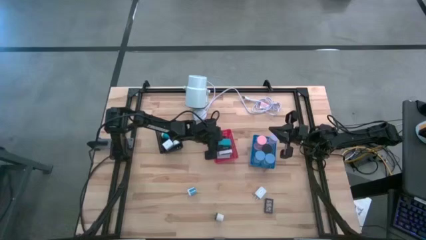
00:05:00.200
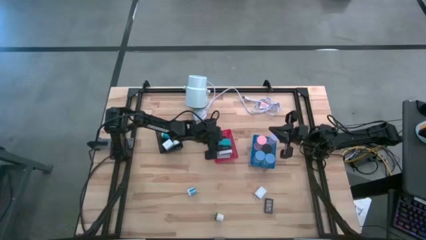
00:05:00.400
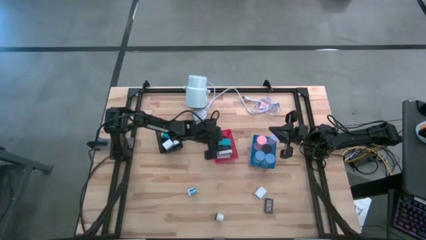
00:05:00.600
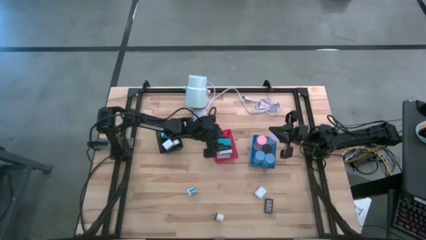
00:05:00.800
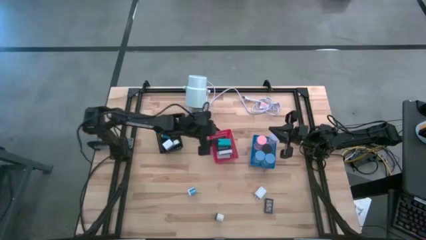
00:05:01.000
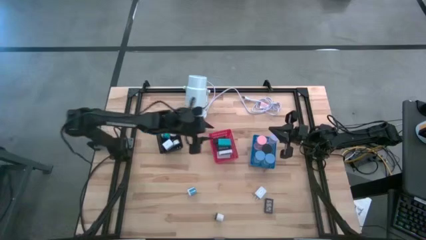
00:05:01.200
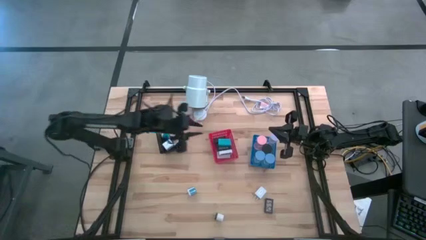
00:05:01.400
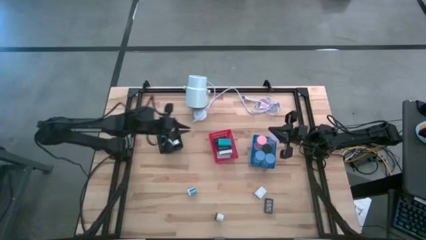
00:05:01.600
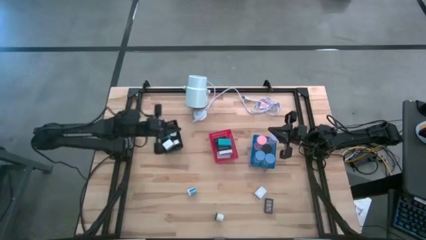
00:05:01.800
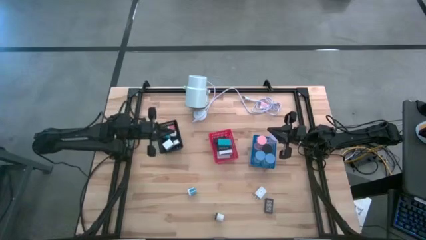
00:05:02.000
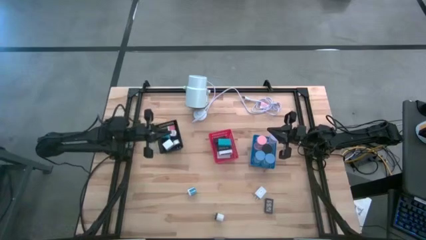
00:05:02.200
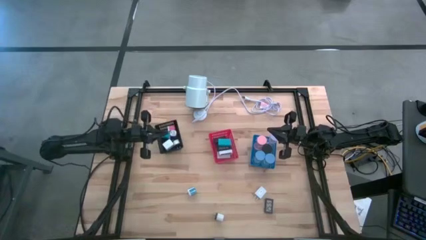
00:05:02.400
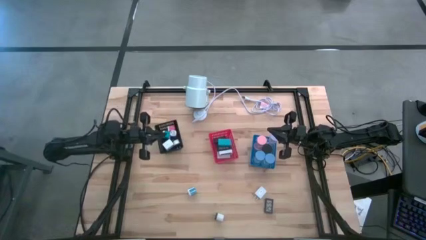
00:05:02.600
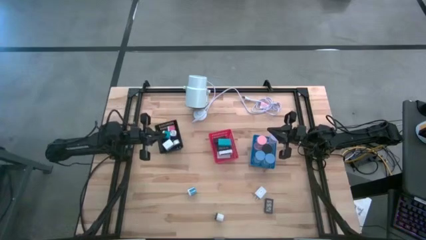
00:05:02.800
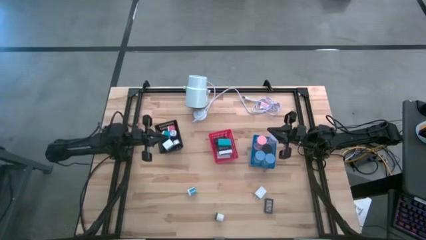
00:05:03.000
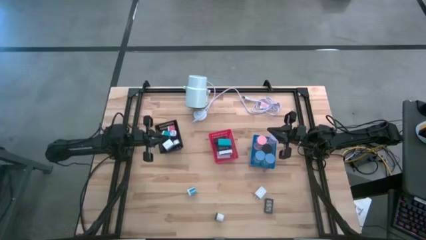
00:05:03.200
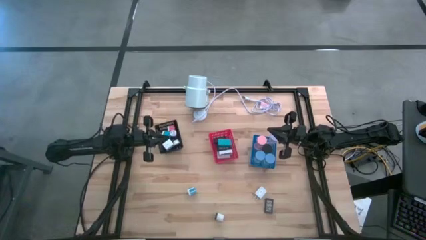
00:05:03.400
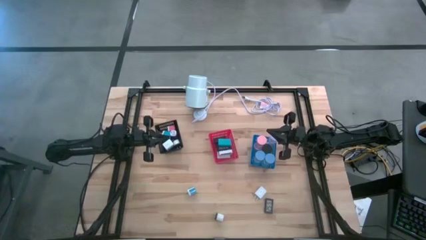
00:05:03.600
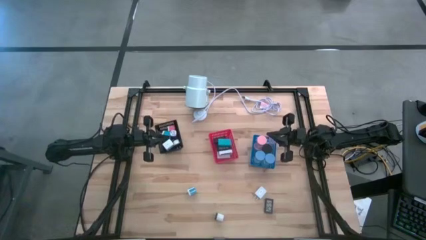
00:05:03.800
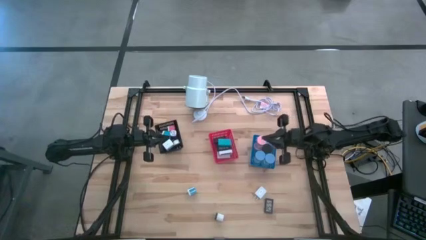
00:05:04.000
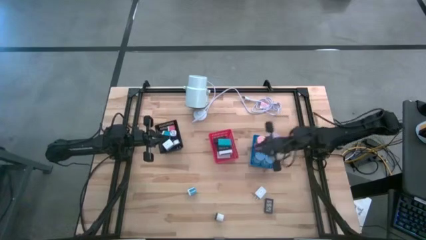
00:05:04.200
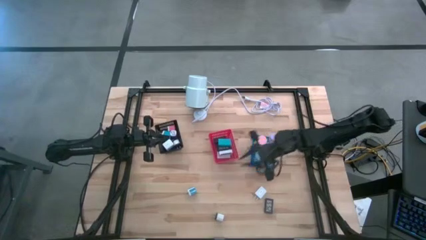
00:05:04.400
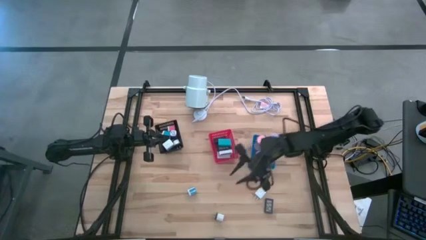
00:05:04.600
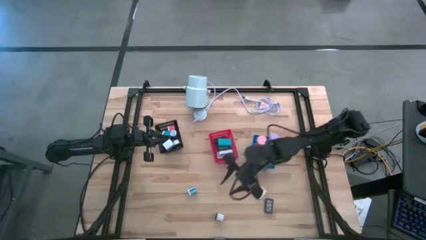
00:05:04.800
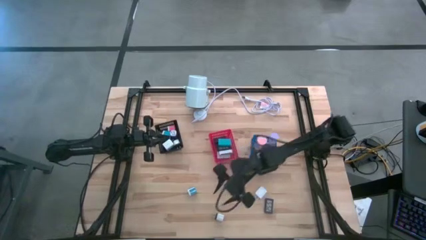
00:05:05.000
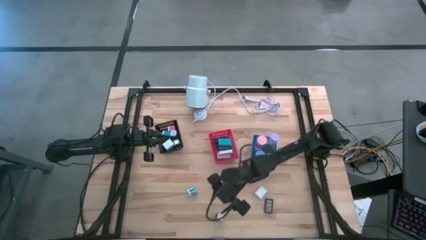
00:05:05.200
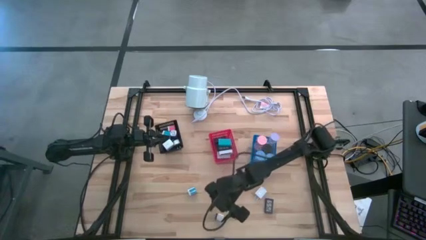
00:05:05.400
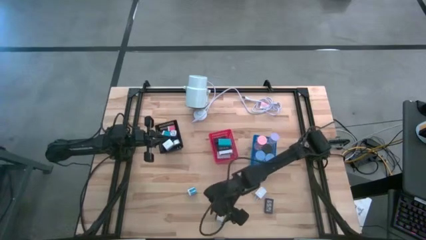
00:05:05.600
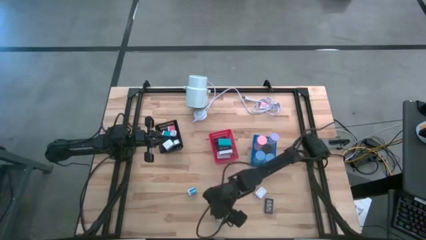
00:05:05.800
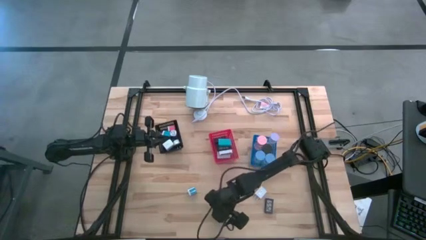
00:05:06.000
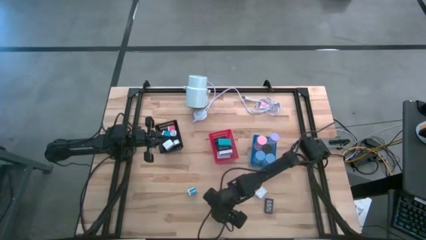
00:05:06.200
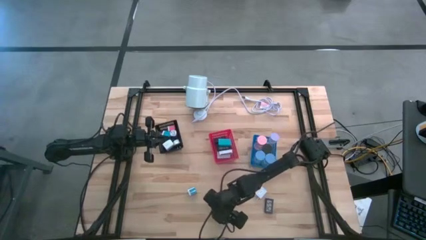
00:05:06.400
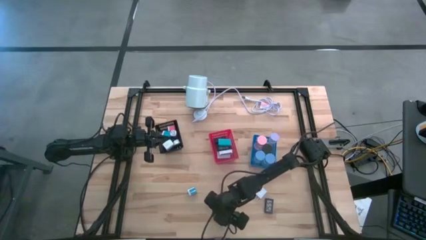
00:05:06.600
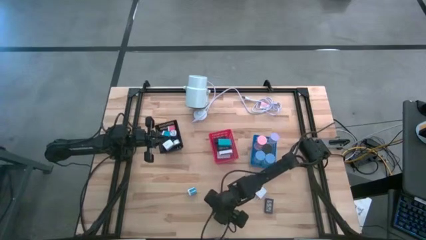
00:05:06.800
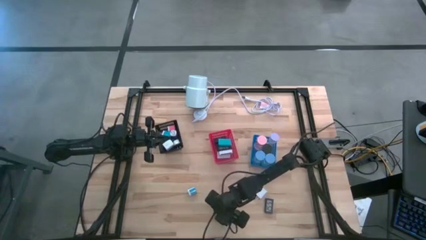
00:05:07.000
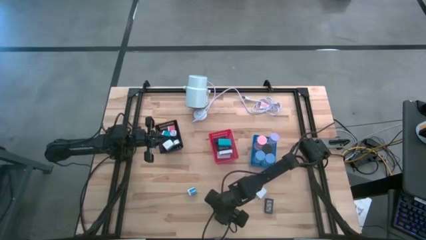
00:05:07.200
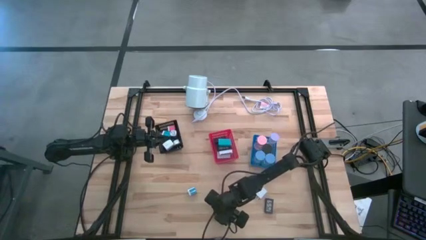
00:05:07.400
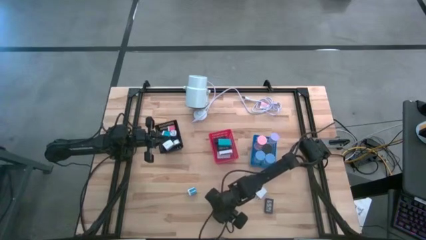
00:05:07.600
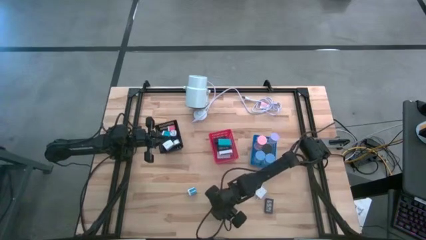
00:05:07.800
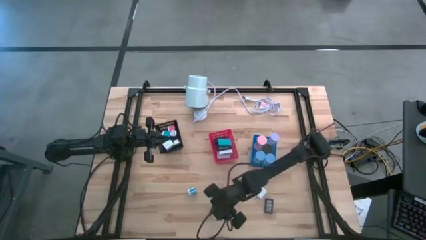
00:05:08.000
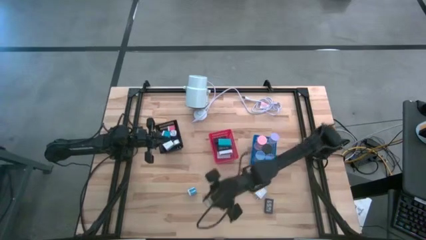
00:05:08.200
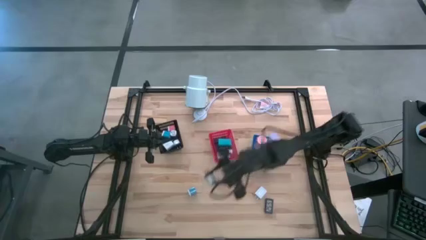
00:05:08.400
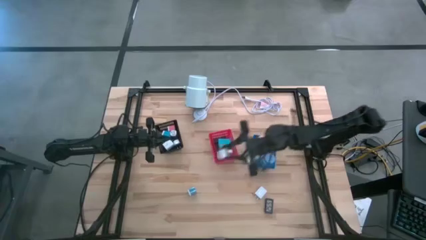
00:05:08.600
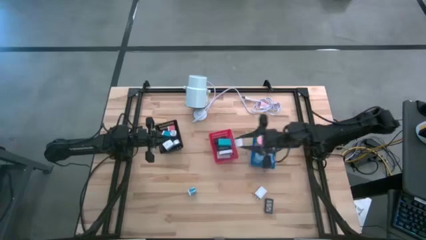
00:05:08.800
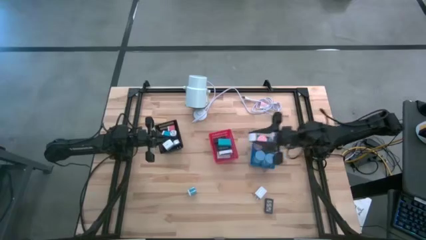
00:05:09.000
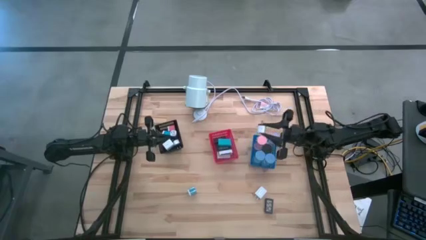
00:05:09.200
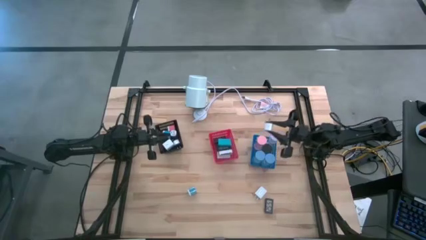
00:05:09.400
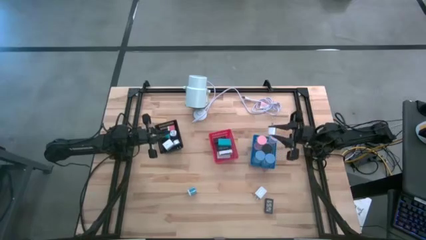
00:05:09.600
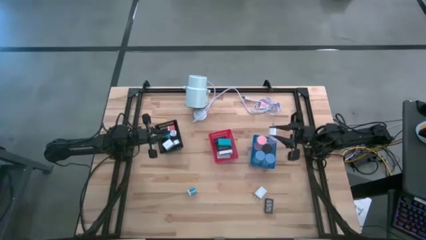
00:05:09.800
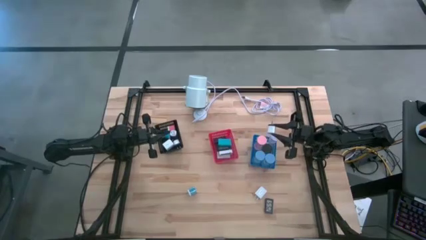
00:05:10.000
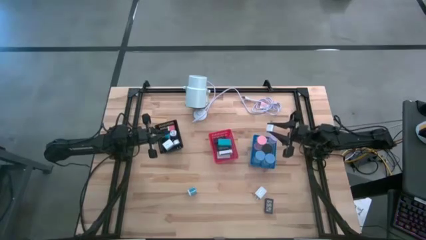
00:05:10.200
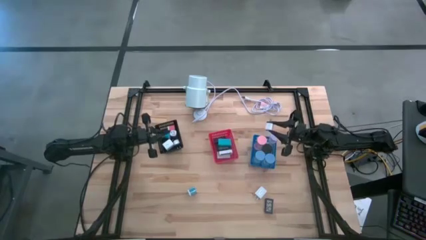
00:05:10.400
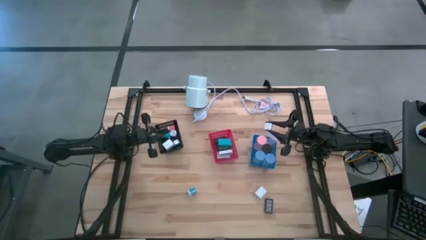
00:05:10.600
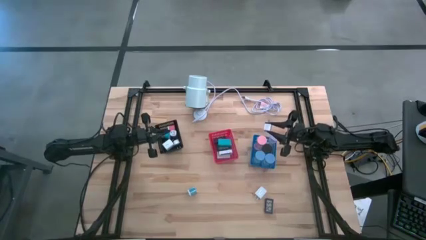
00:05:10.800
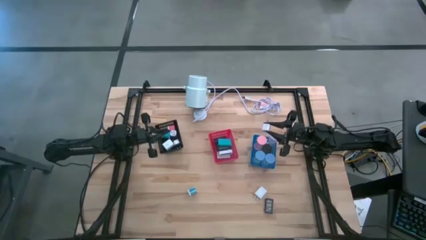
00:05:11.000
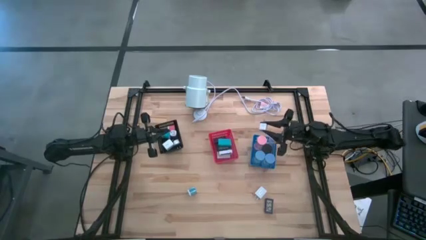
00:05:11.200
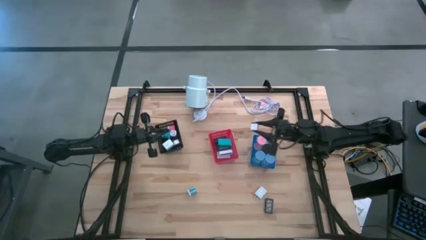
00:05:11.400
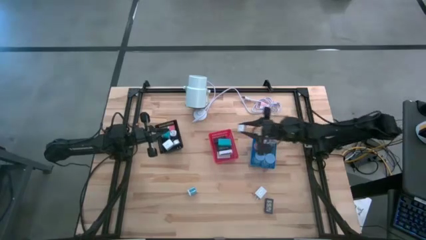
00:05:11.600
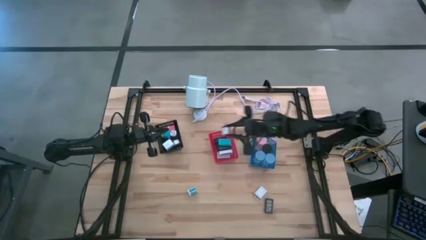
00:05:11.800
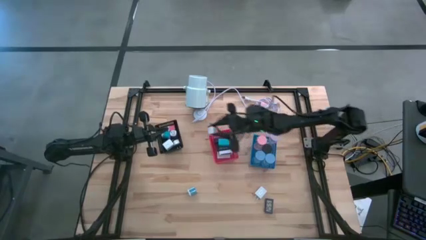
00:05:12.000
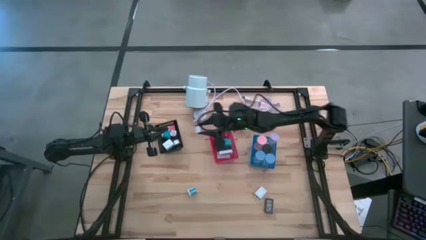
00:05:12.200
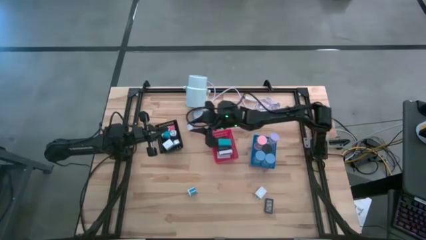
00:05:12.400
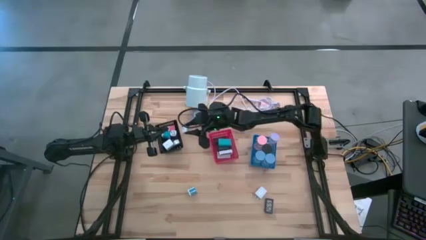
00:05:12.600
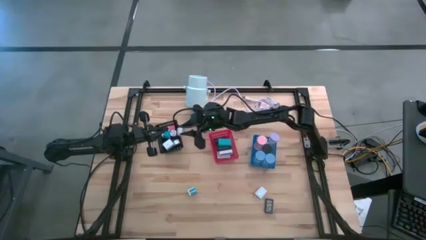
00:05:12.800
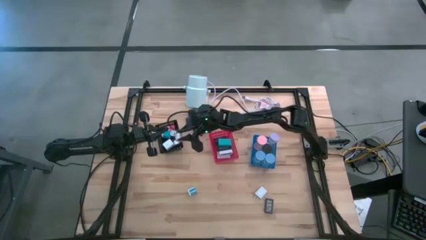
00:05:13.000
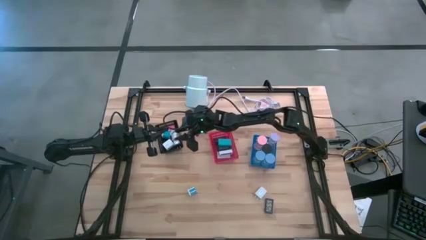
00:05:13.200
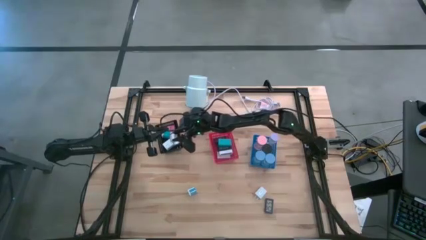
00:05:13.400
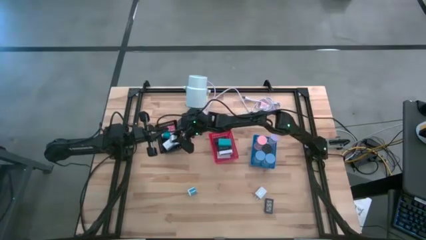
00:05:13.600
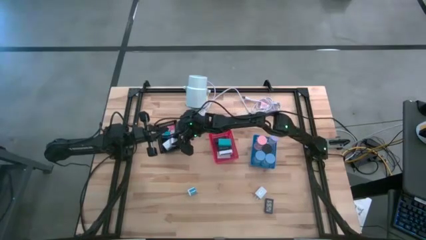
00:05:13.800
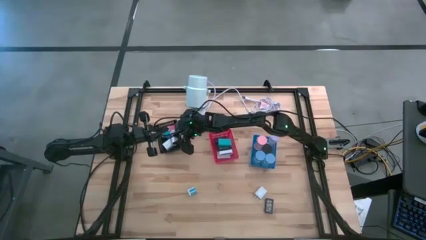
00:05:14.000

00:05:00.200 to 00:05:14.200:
Task: Pick & Place Office items
Put the white charger adapter into the black bin

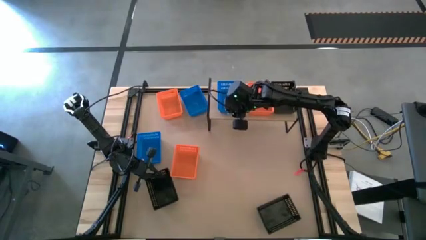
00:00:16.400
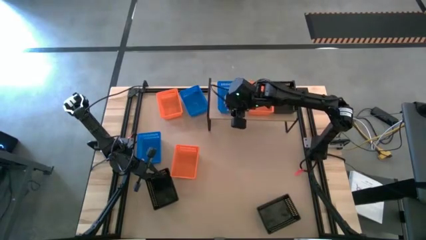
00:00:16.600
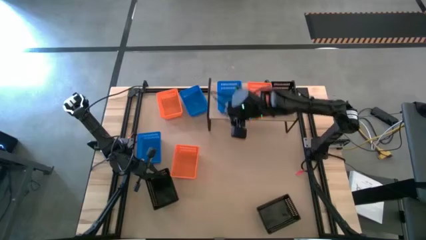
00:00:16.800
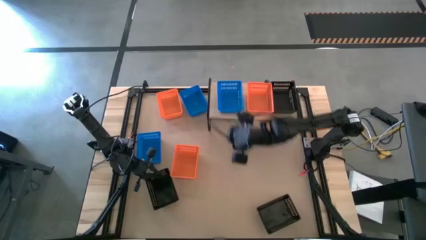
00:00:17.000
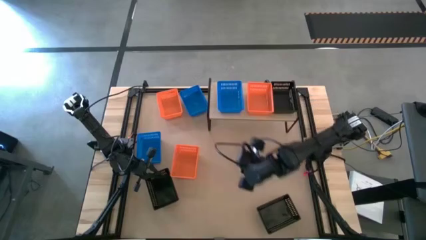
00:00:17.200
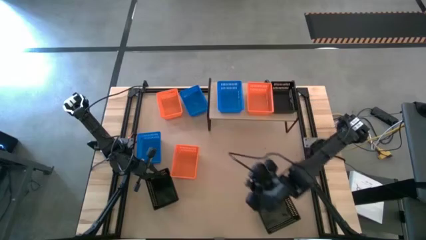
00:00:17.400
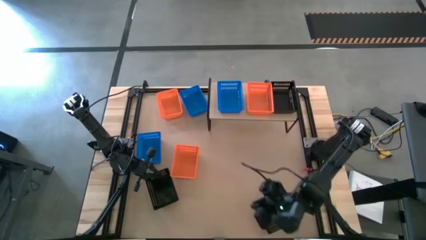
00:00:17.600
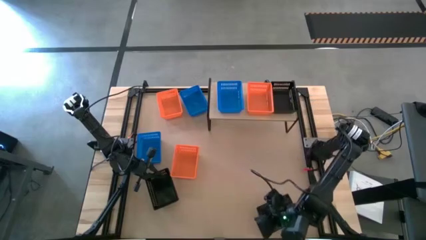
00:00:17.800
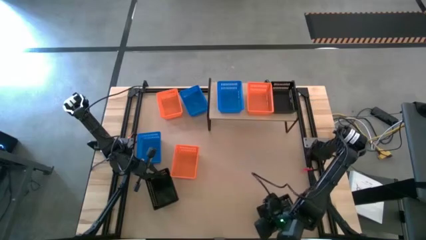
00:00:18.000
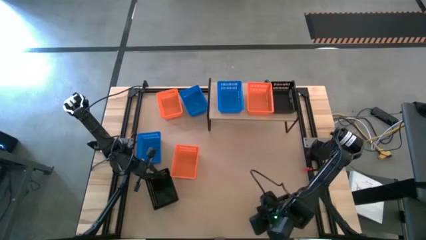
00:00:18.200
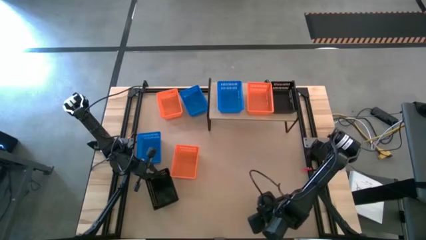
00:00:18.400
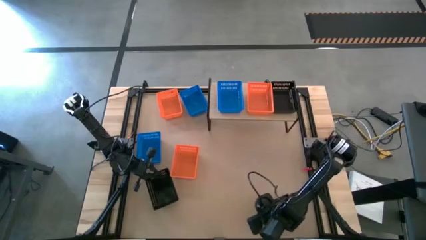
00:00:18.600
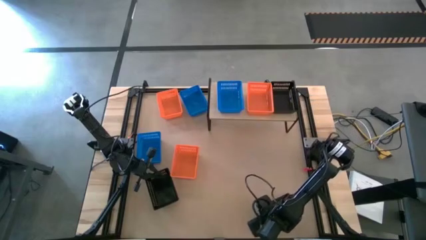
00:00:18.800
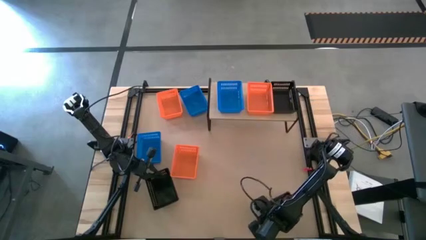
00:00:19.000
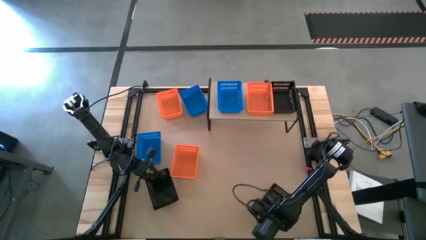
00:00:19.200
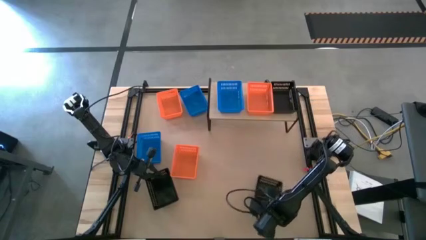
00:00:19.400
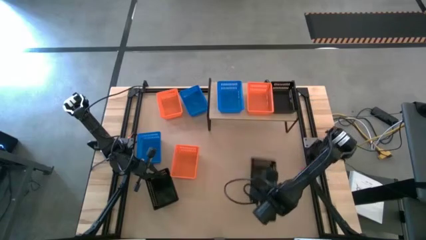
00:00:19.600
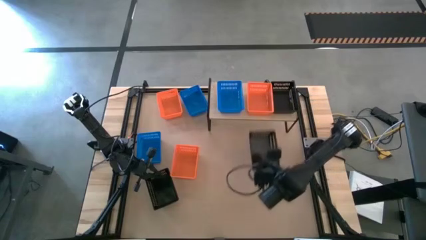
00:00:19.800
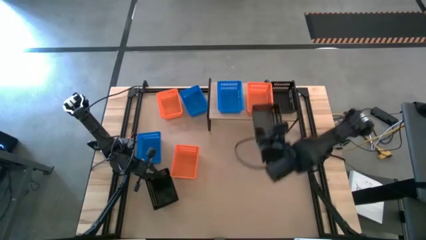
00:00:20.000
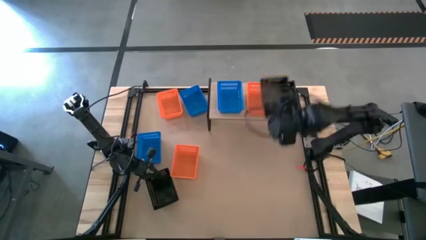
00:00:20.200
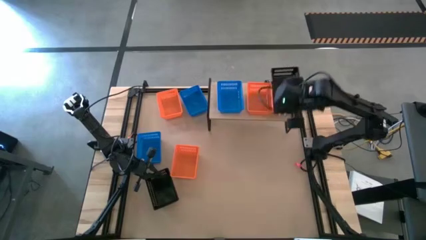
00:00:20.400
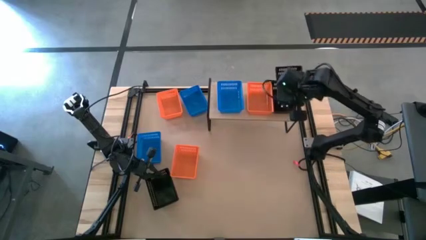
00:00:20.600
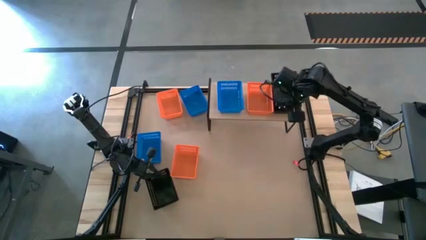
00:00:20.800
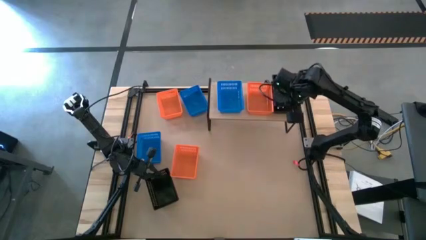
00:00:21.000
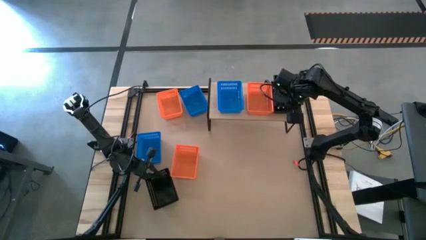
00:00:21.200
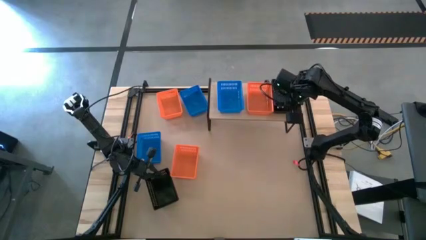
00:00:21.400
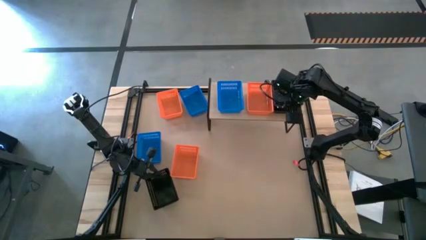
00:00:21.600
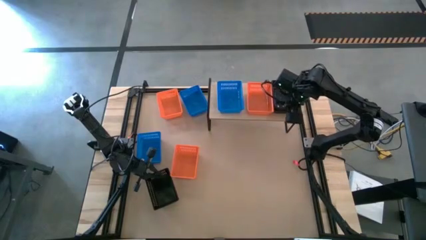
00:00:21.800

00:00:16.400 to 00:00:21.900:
Task: Stack baskets on shelf by color
Stack the right black bin on top of the black bin on the shelf
